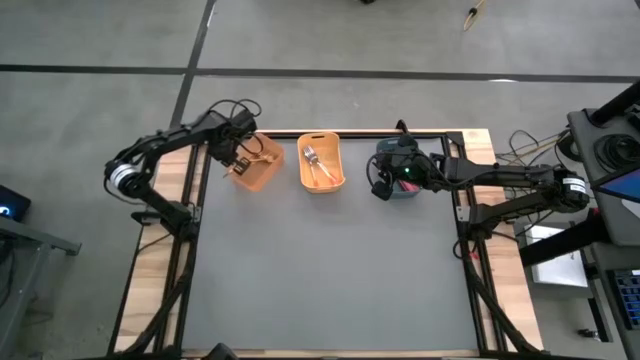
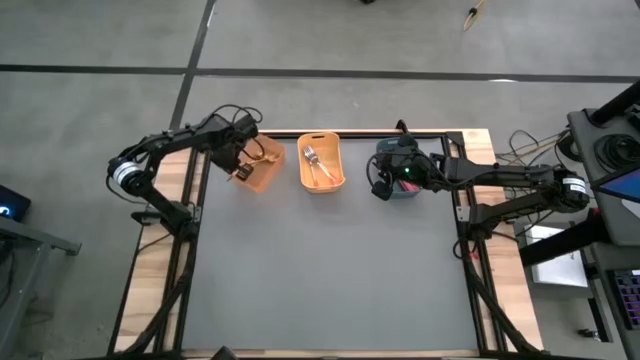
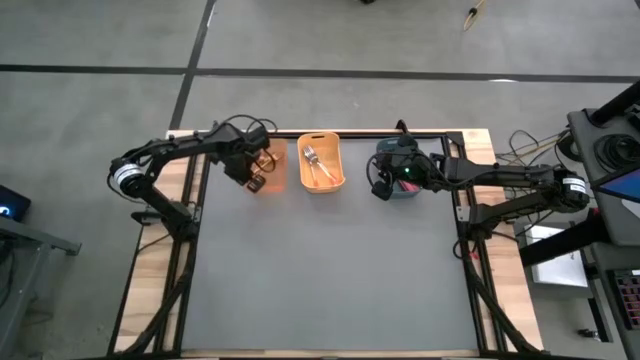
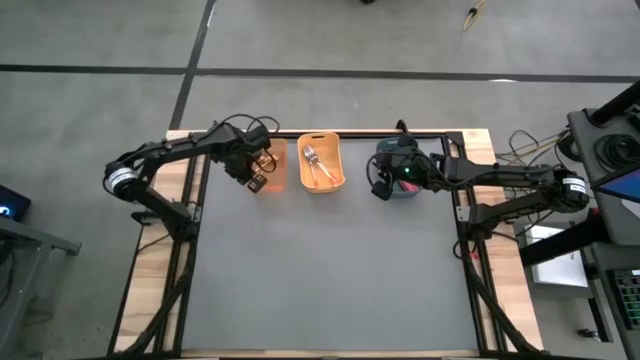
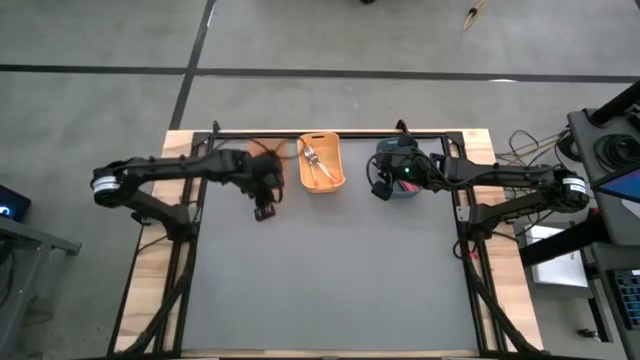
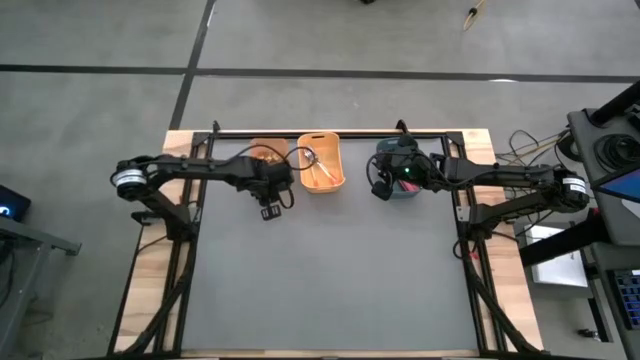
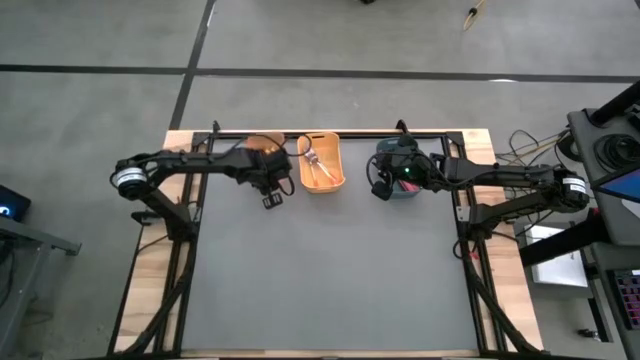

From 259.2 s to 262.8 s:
Task: Sort silverware by color (type)
Adjust the orange bin on the table

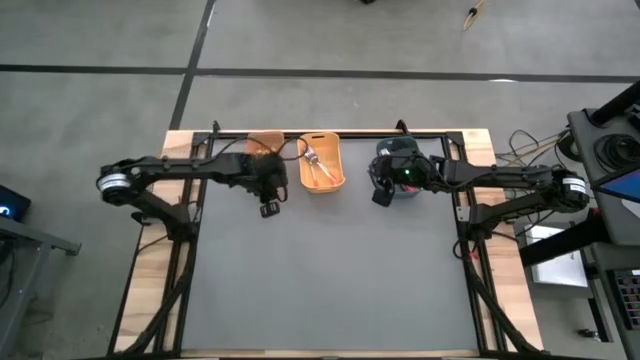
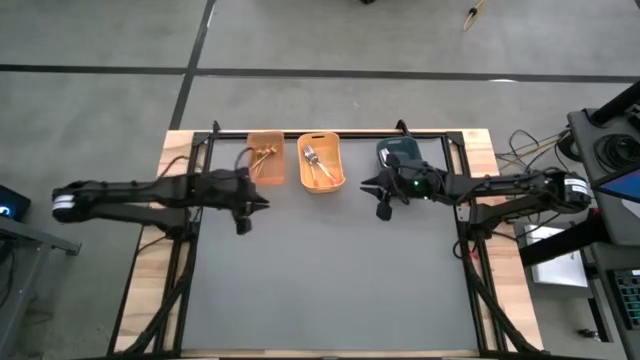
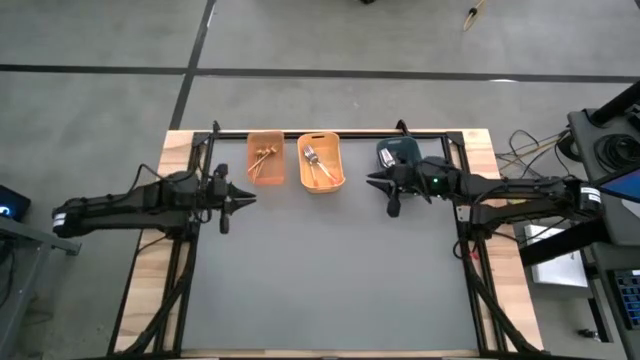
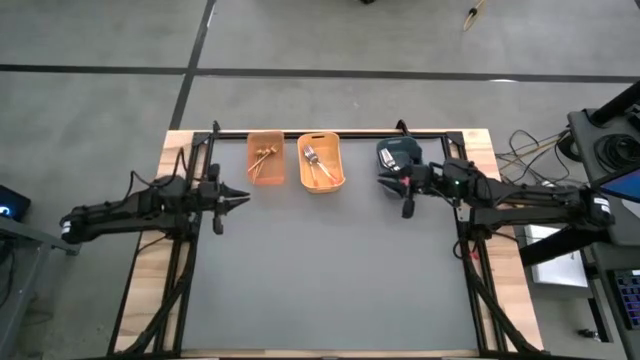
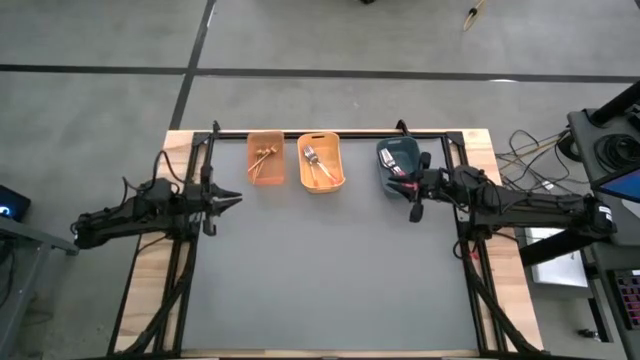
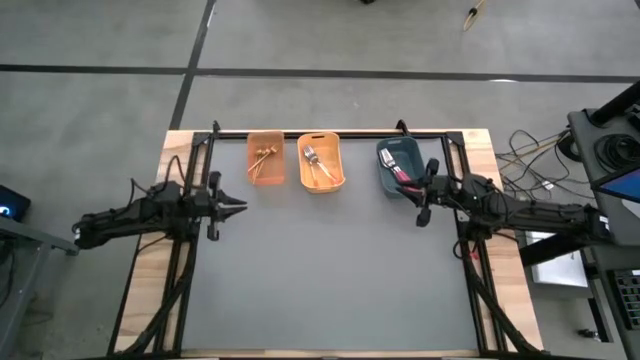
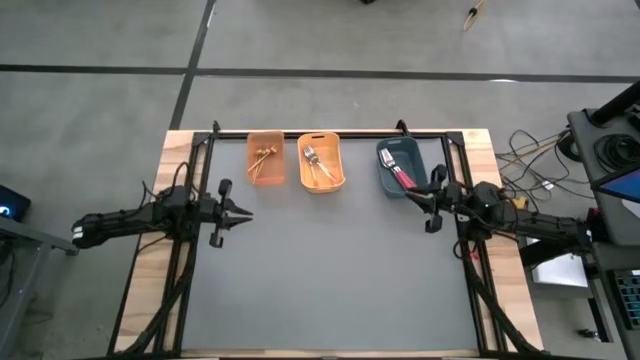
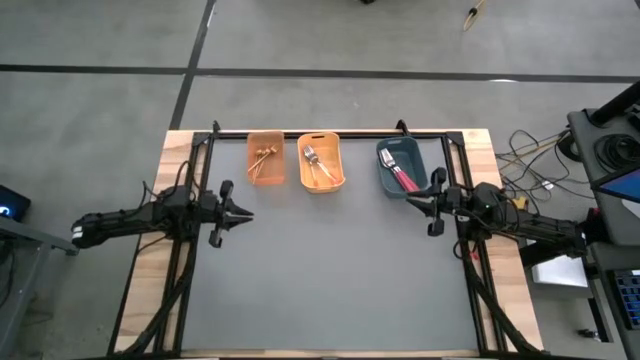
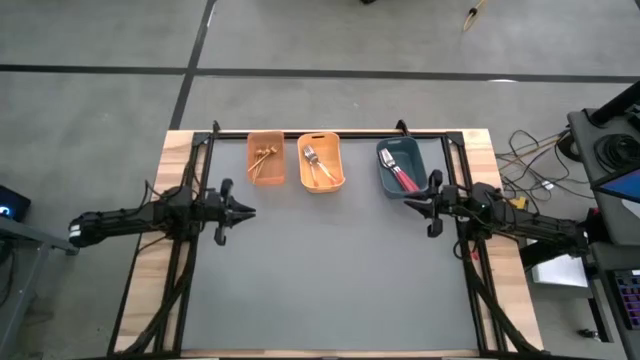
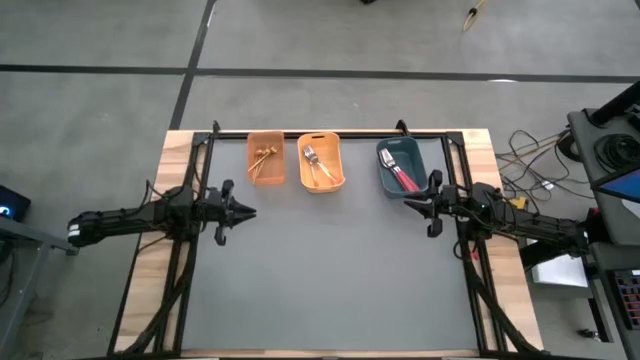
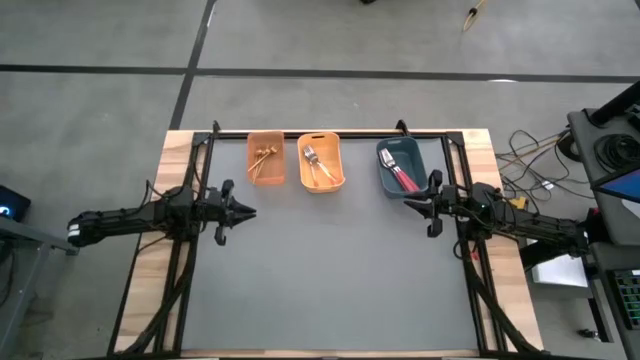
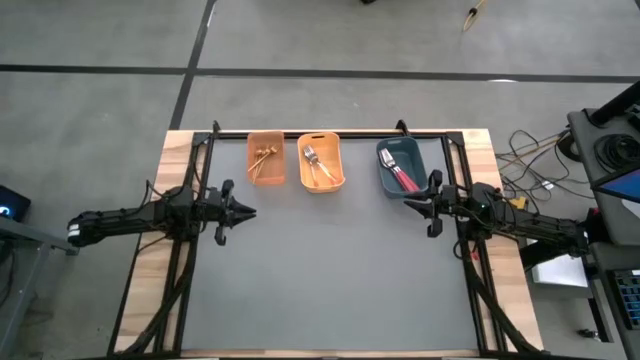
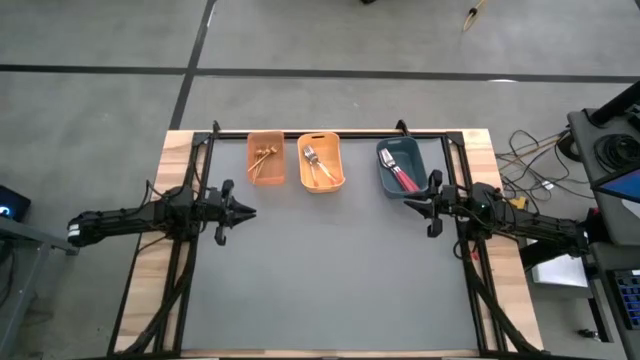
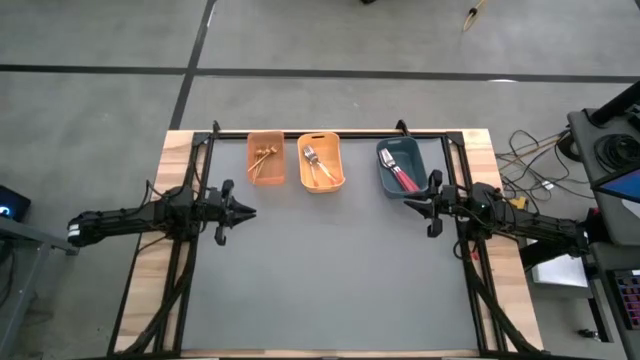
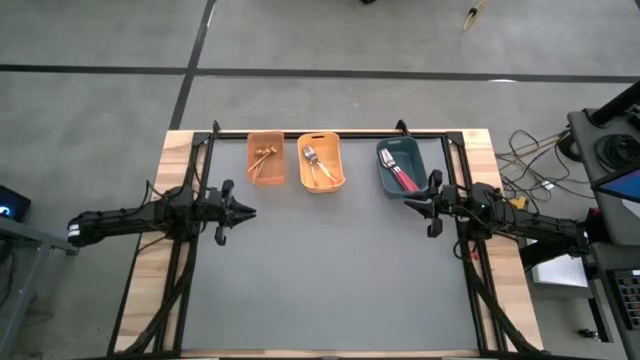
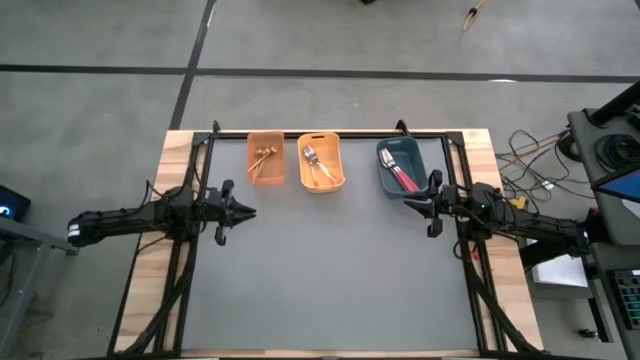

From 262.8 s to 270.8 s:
Return to Home Position

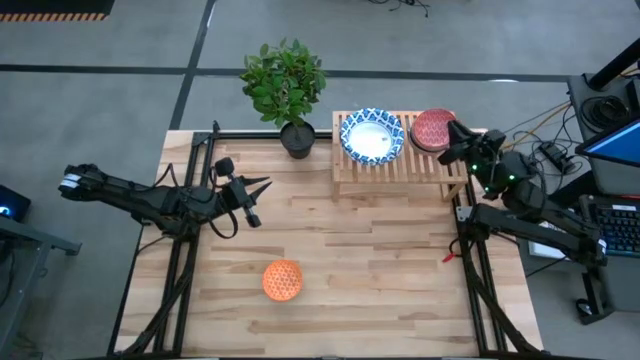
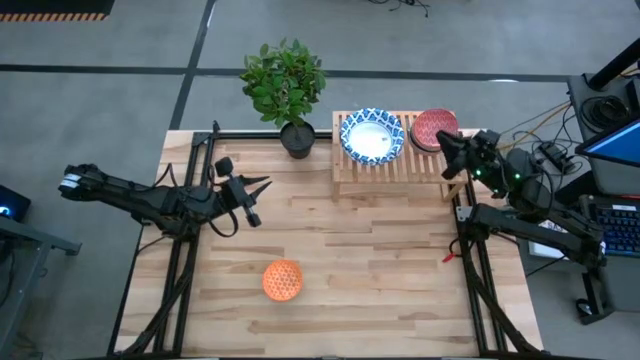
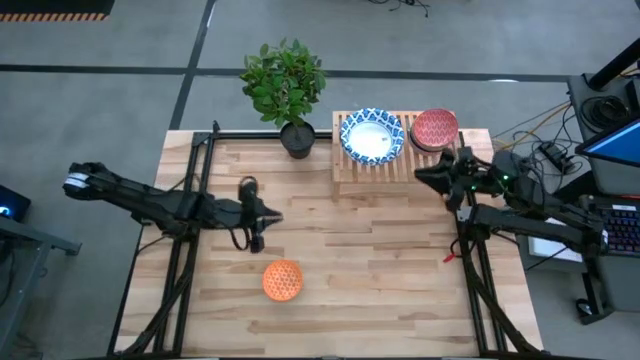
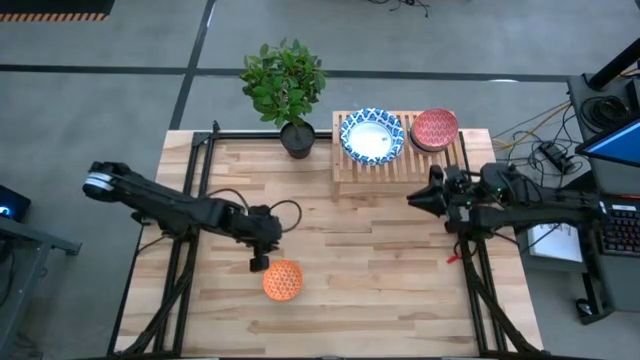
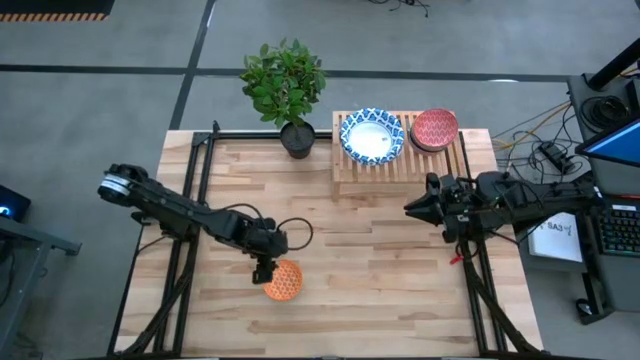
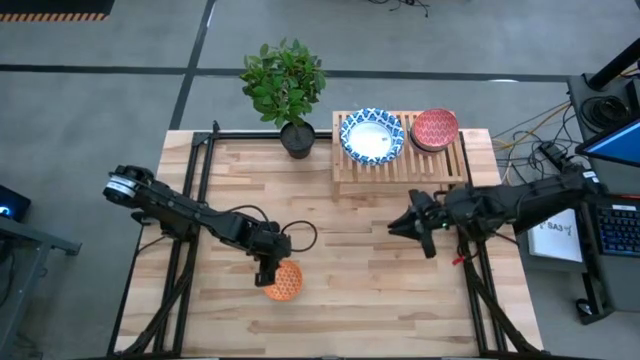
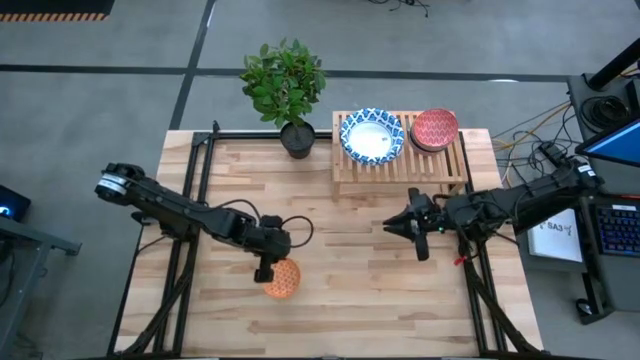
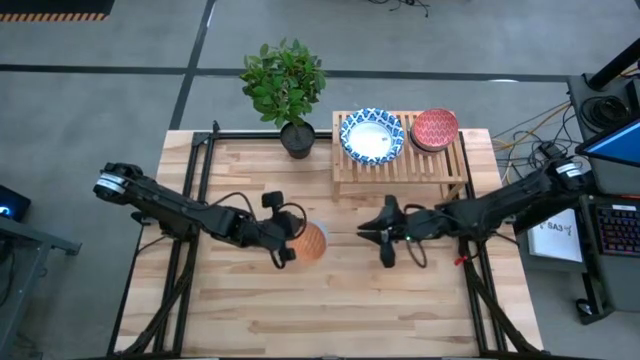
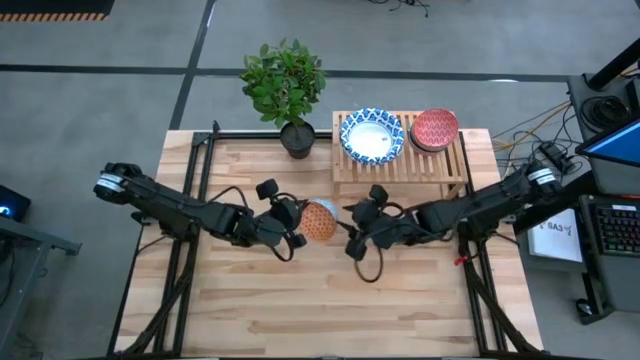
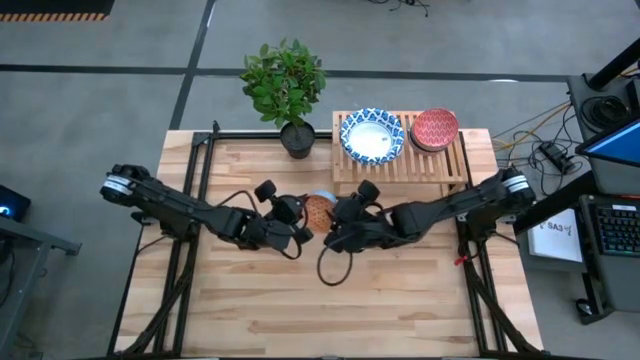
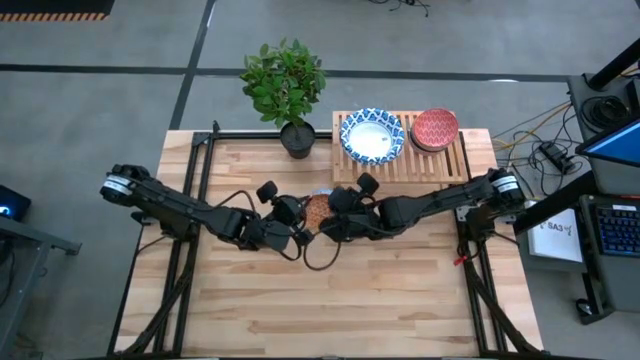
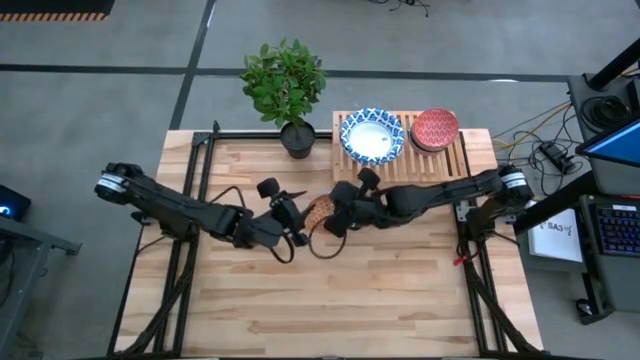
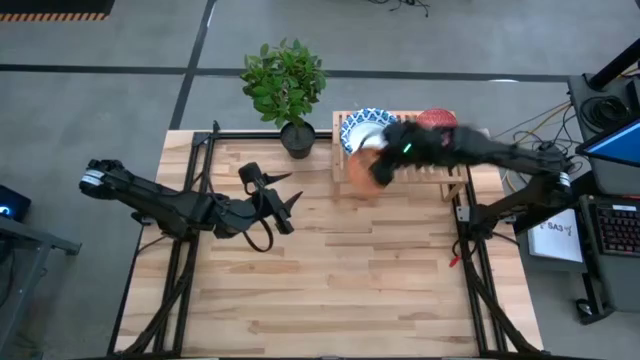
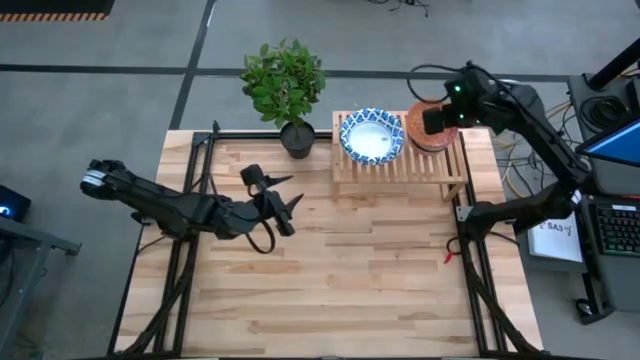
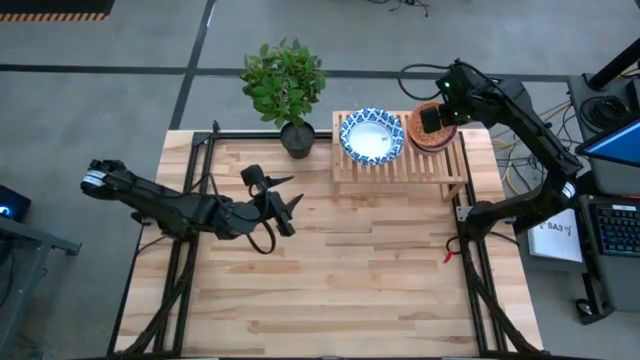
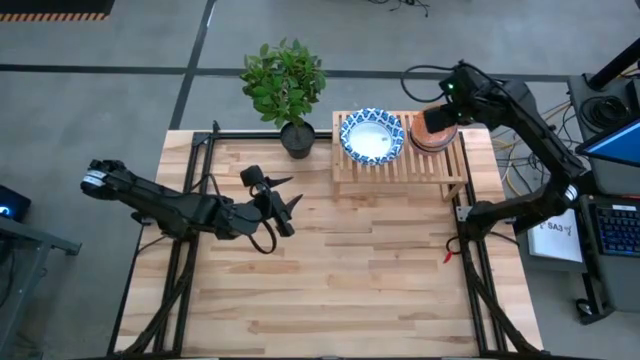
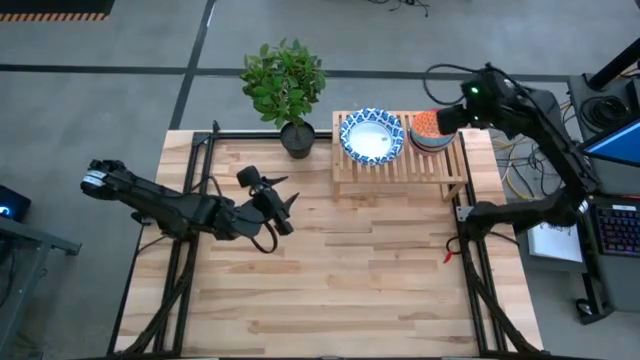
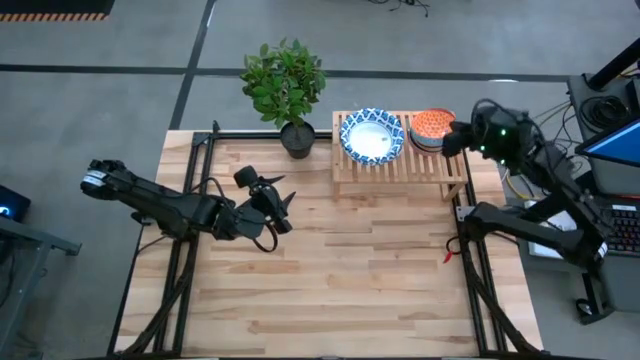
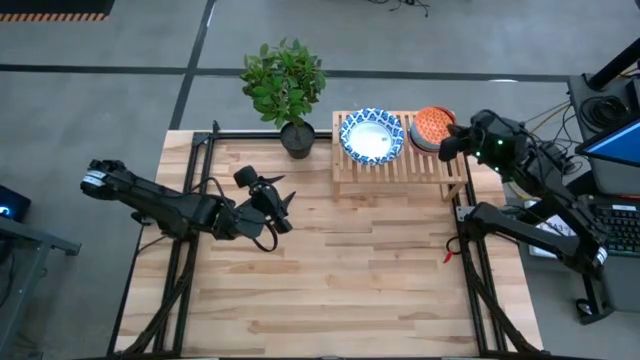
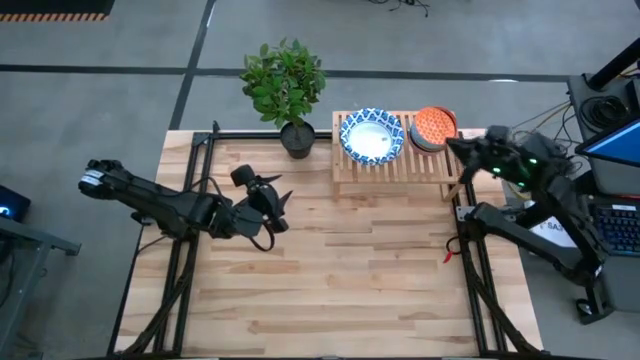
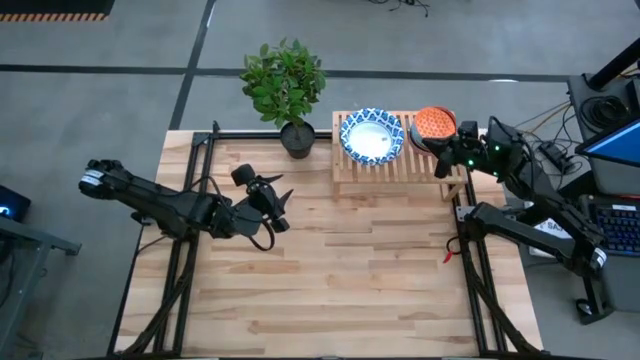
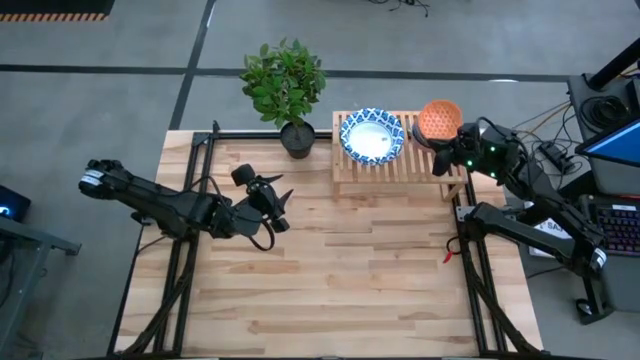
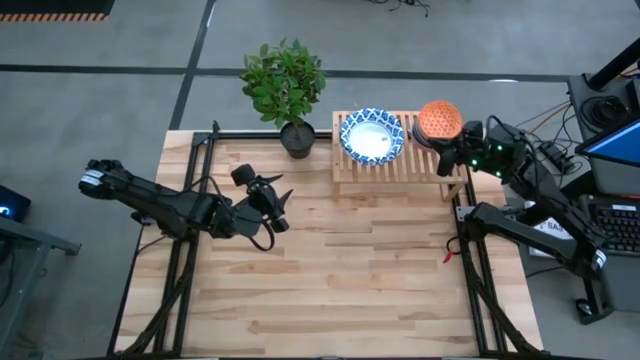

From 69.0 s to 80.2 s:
Task: Place and stack bowls onto a shelf
Stack the orange bowl on top of the red bowl
